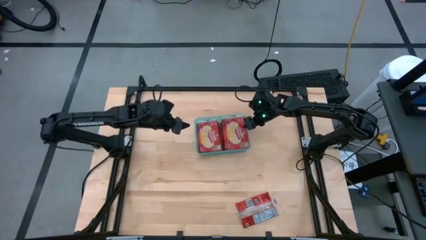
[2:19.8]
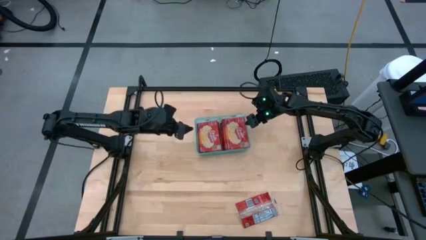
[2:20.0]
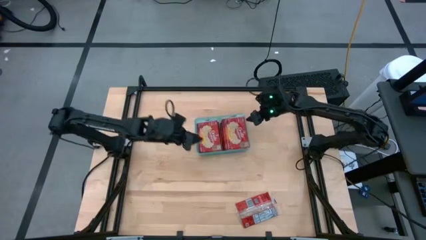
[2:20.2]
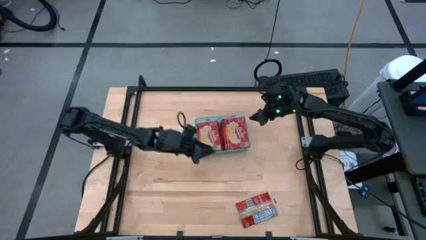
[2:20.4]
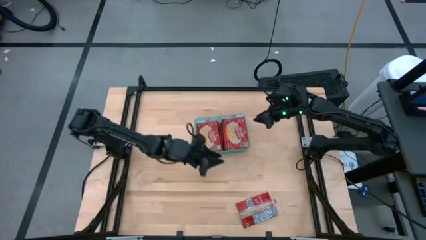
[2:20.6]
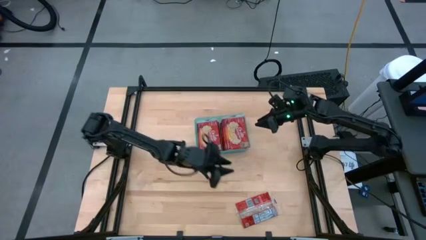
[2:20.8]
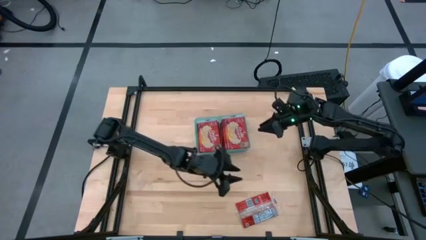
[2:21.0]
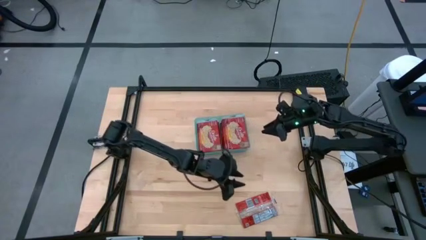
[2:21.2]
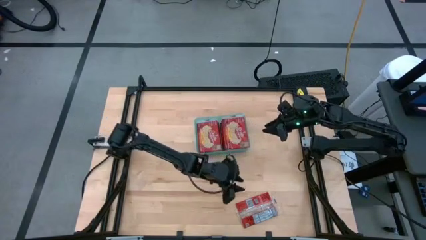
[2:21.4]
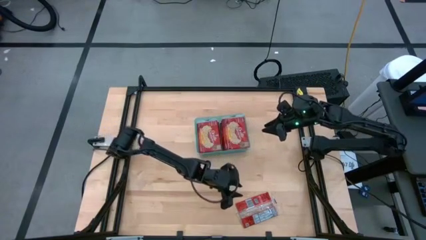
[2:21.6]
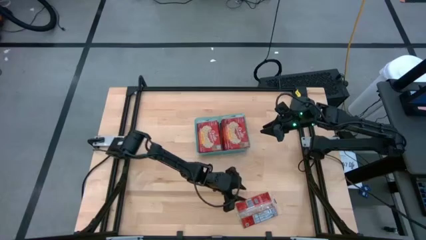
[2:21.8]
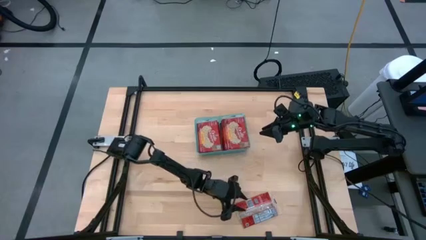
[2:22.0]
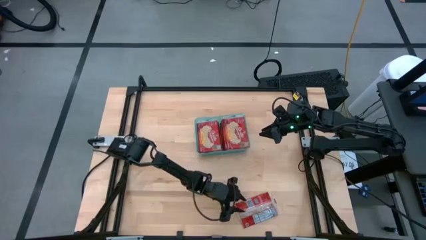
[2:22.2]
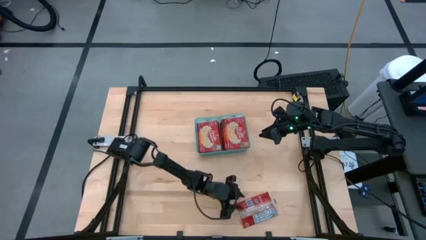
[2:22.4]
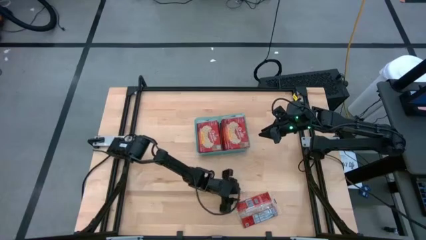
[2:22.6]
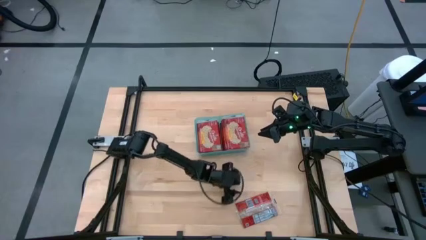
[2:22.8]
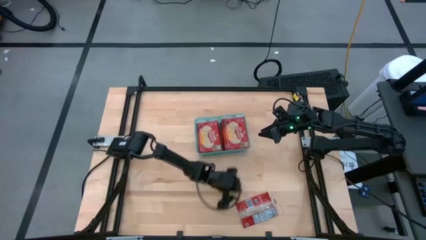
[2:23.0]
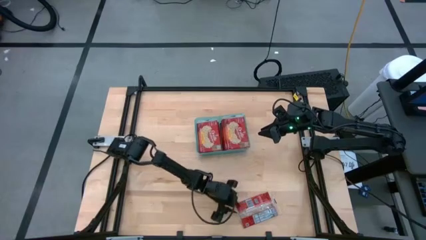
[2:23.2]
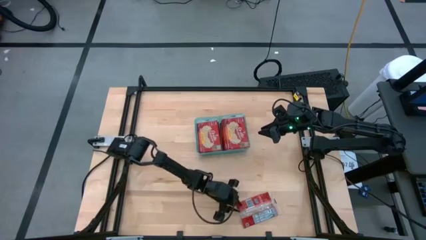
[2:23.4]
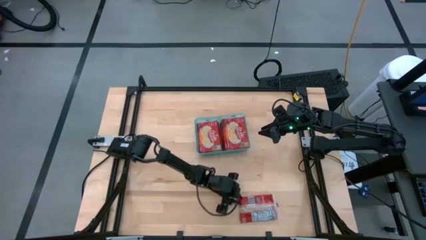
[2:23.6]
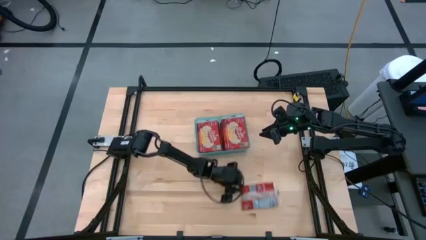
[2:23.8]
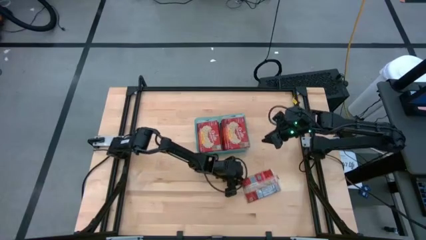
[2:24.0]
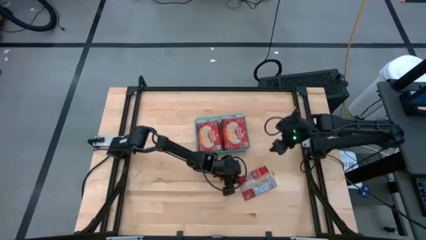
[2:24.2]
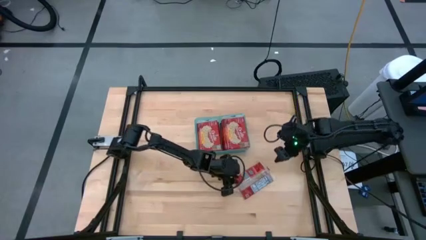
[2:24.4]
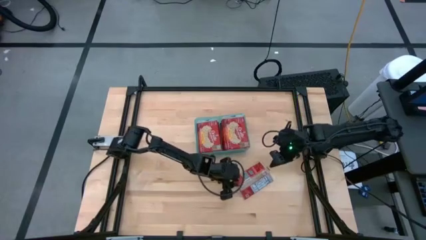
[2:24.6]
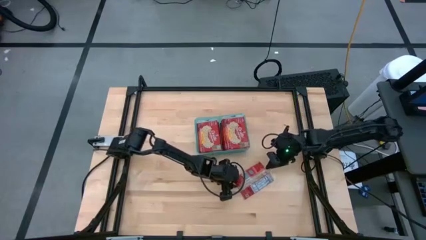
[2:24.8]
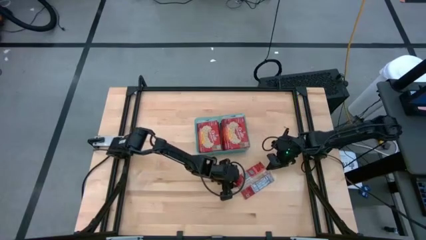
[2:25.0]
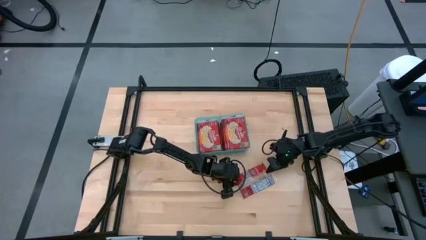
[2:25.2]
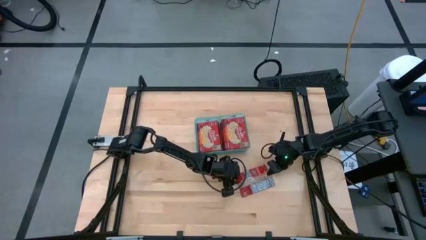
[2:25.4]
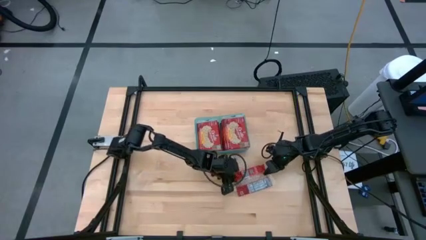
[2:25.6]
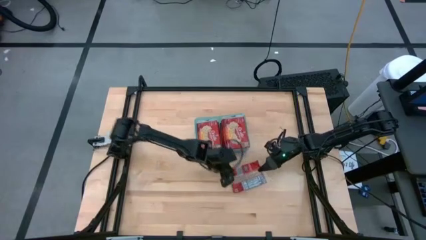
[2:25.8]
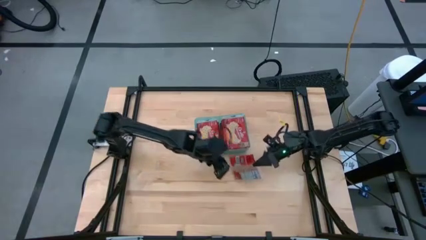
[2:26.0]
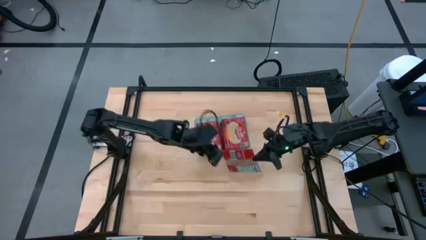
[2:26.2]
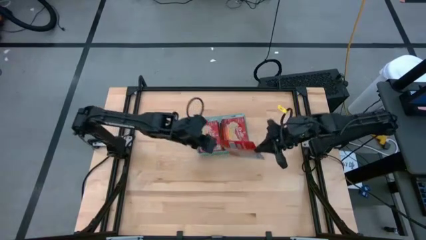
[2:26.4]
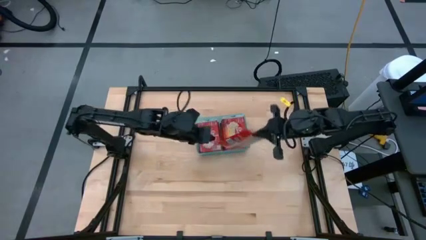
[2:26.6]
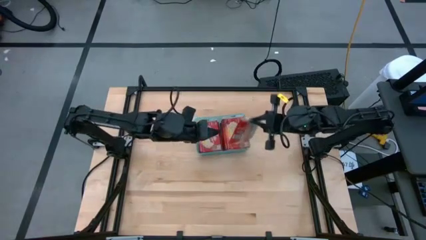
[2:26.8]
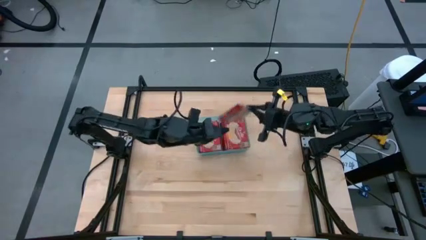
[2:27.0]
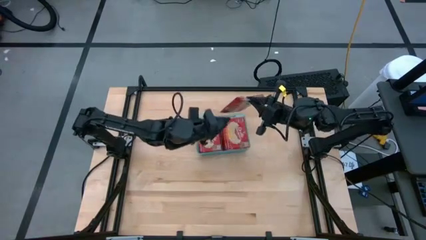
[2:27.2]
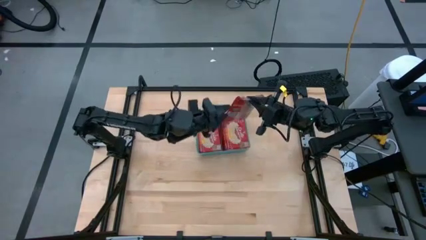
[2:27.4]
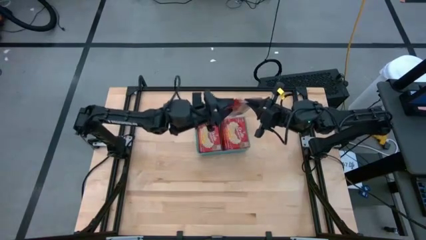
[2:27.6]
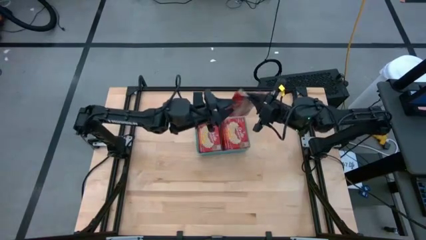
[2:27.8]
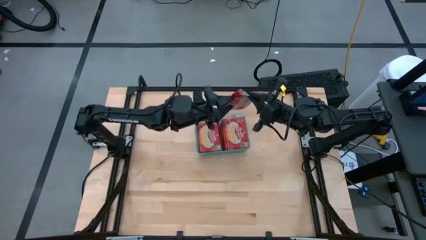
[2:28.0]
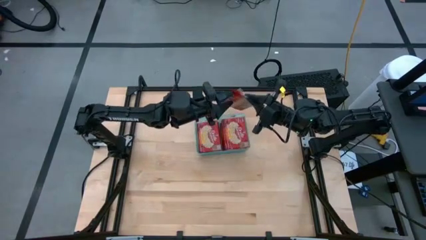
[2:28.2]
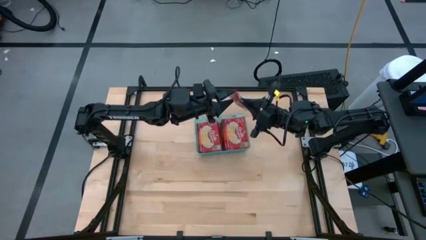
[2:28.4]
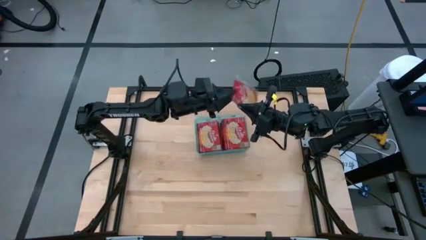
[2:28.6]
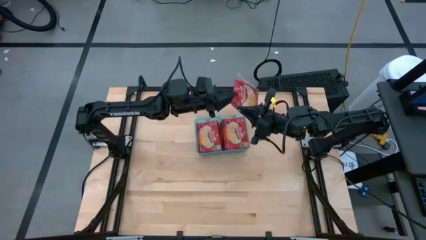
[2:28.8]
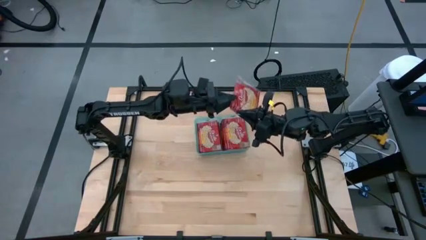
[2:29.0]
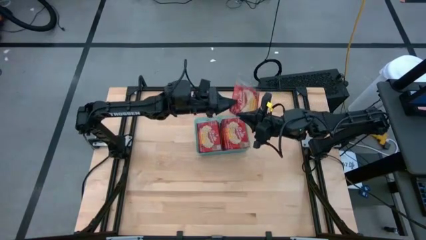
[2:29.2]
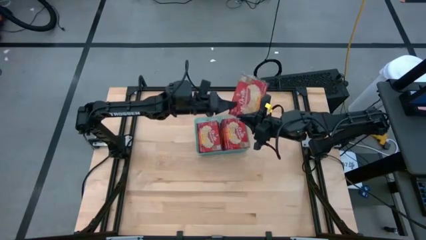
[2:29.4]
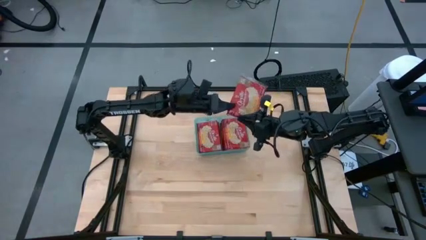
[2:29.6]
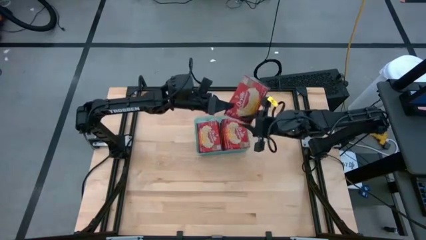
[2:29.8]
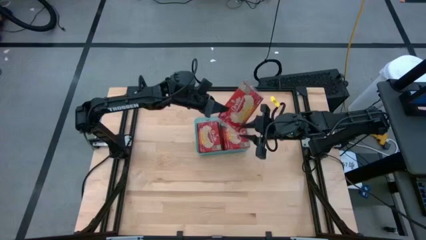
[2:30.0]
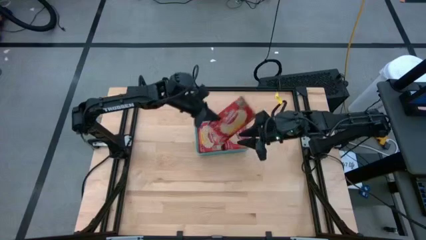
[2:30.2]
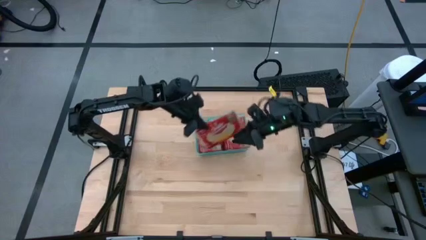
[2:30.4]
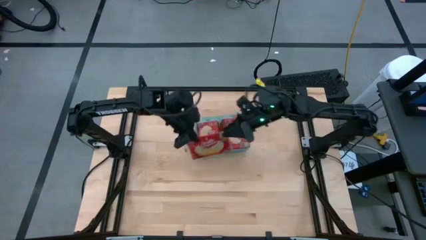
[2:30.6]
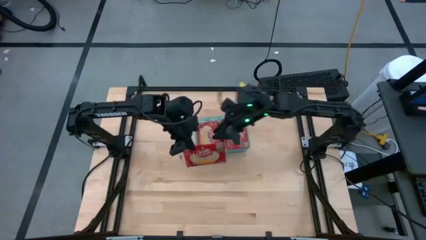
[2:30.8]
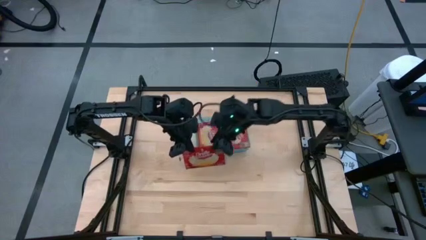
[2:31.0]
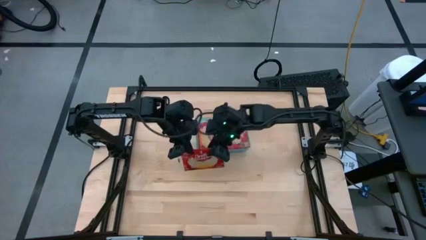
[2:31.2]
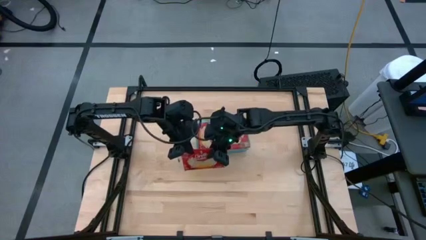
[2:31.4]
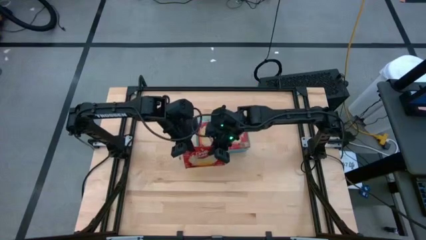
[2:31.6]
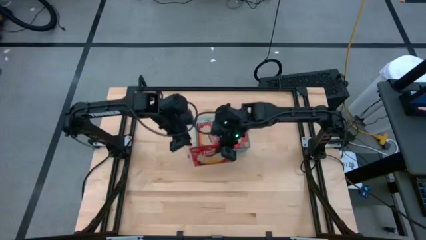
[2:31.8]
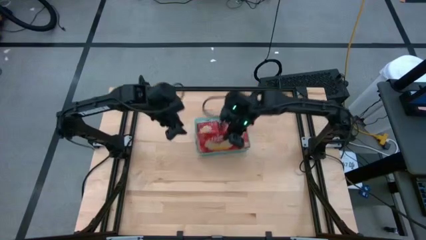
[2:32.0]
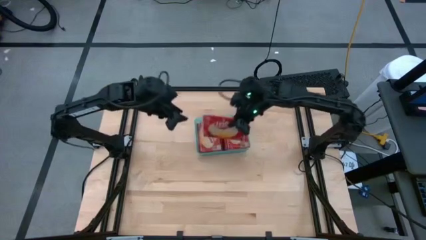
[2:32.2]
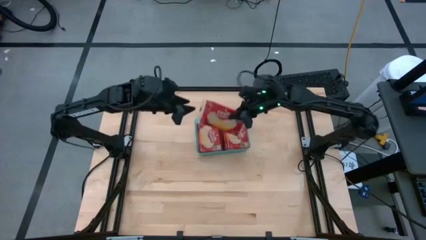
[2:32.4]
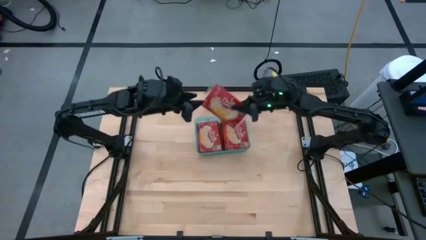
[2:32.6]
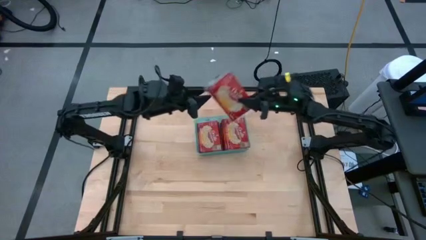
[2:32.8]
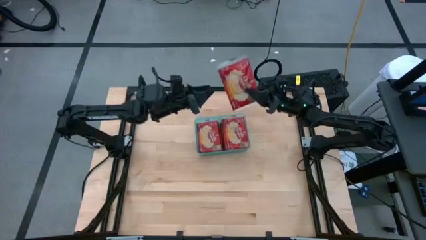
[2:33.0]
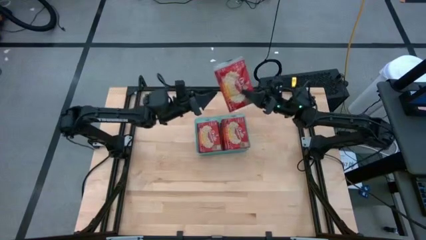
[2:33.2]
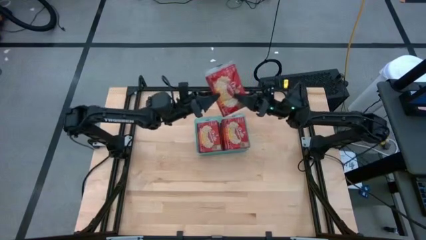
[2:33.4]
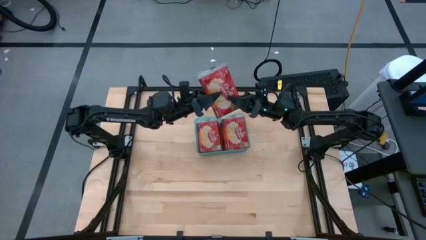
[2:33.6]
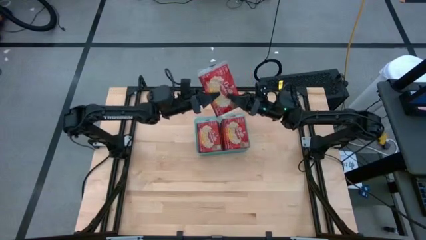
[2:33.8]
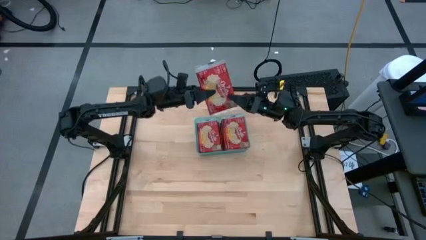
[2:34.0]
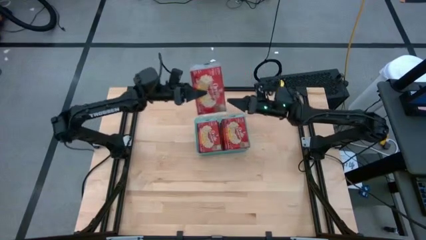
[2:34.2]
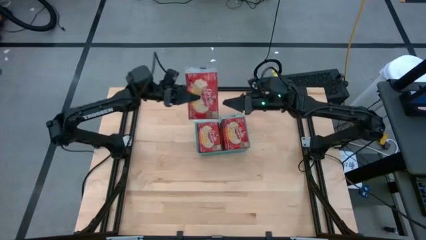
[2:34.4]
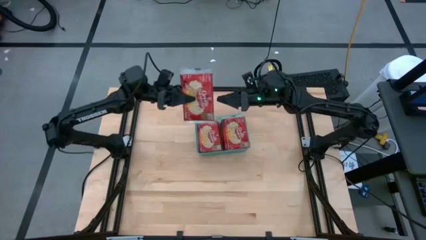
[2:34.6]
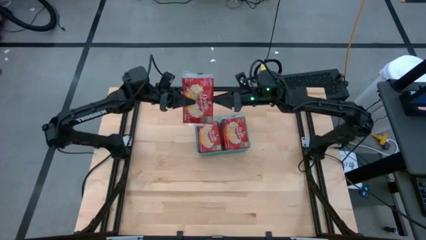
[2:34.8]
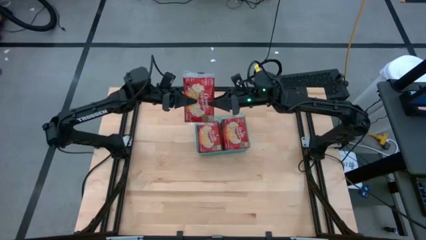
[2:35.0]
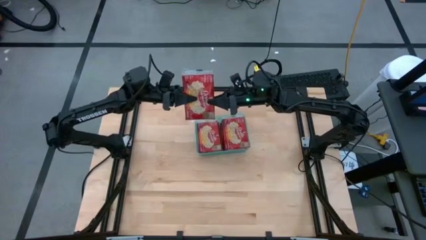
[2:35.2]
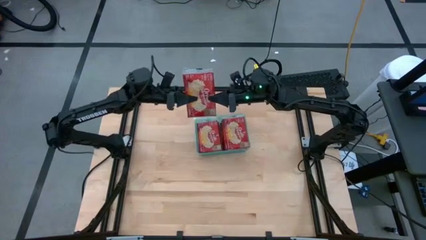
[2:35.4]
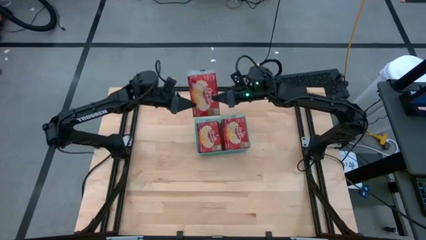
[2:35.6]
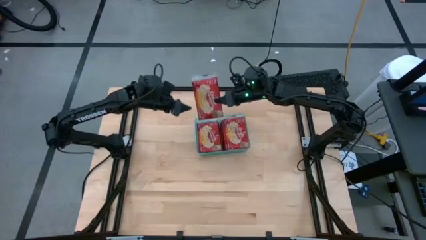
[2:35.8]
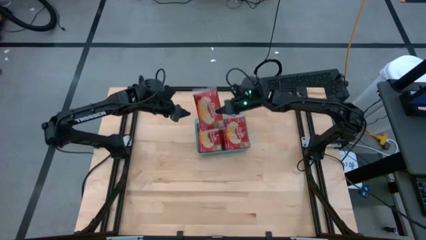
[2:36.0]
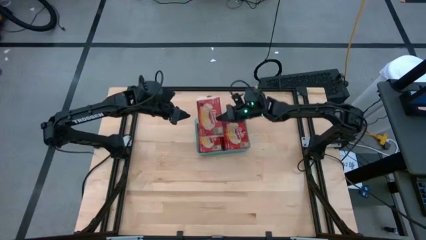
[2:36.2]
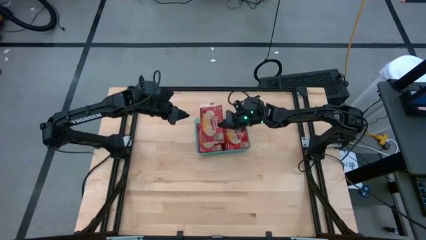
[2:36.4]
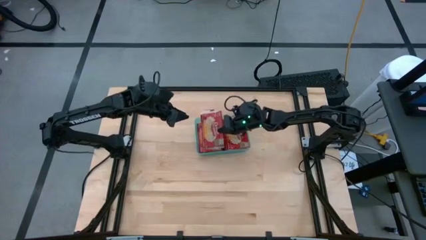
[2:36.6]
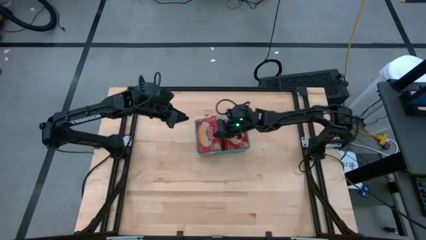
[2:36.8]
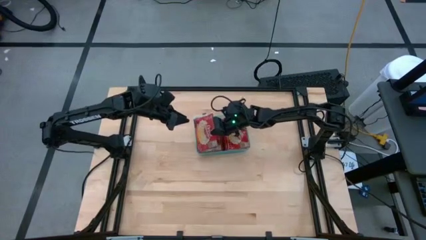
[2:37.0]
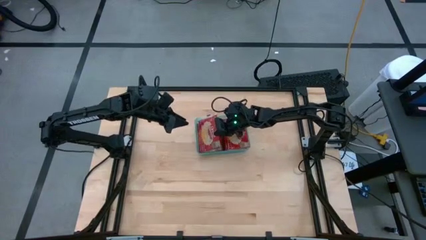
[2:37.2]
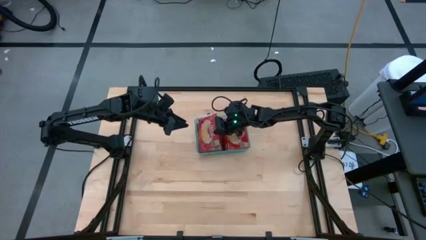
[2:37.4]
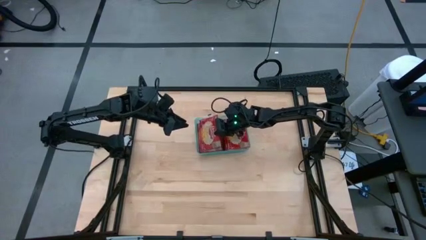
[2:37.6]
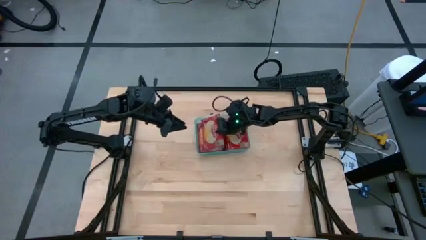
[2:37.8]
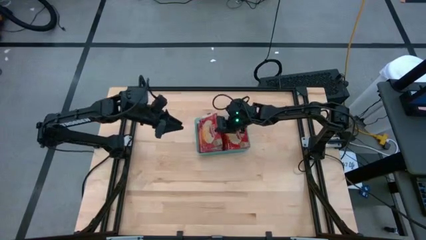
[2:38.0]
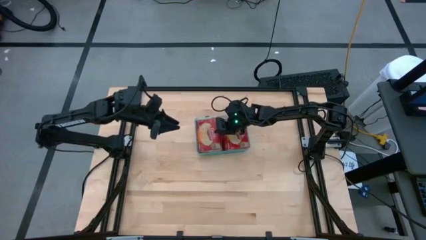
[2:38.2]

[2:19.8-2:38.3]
Task: Sort popcorn bags into baskets
Put the red popcorn bag into the green bin
